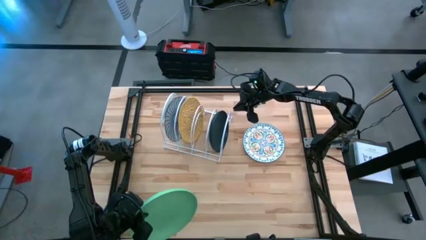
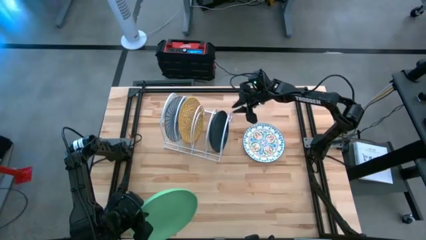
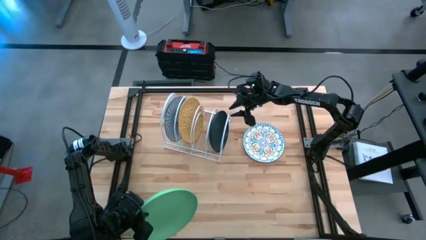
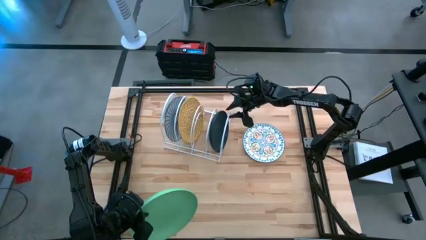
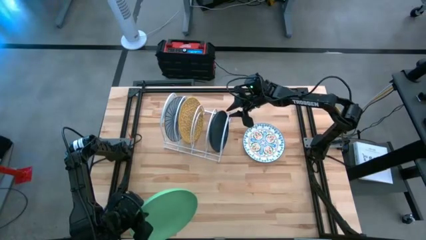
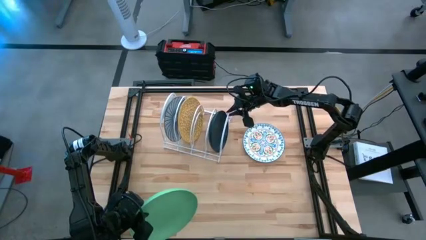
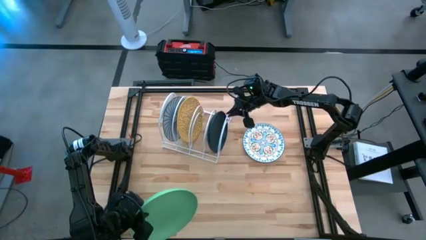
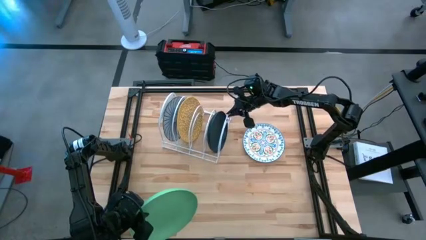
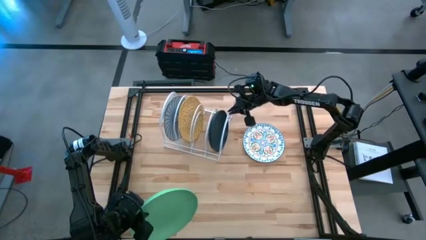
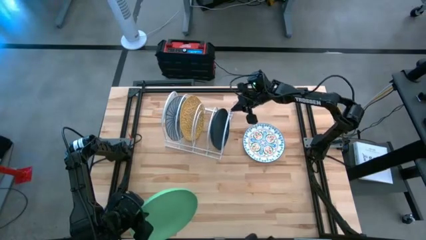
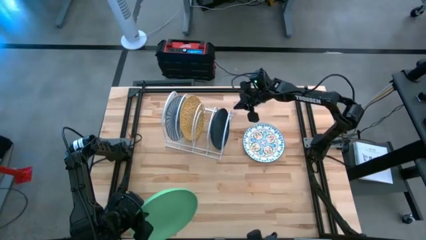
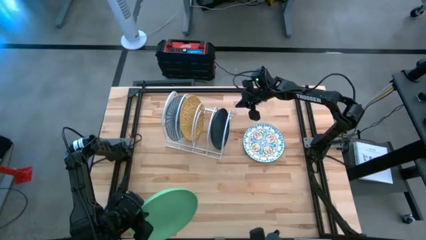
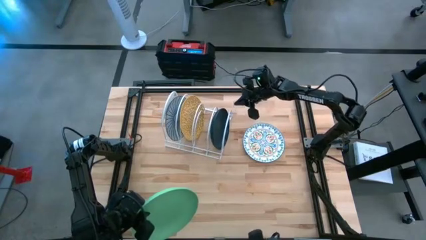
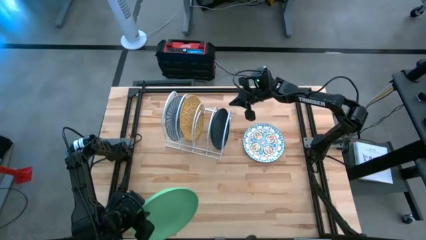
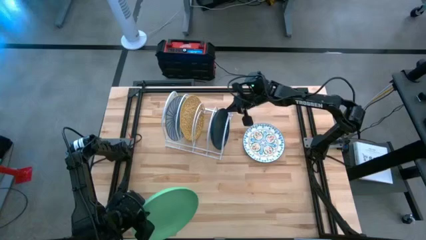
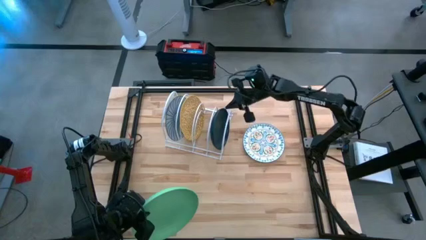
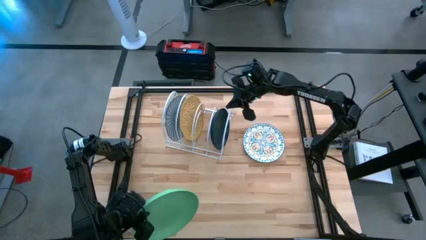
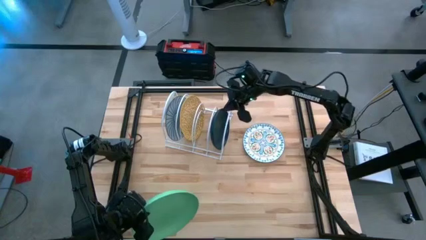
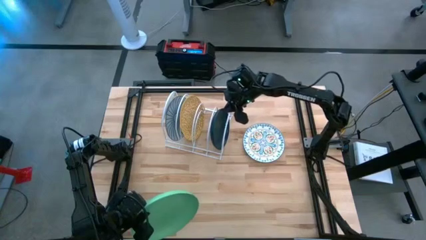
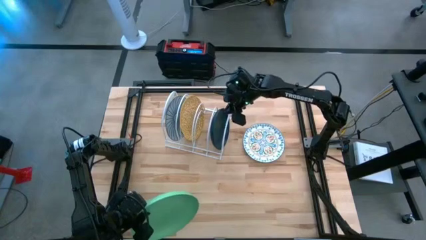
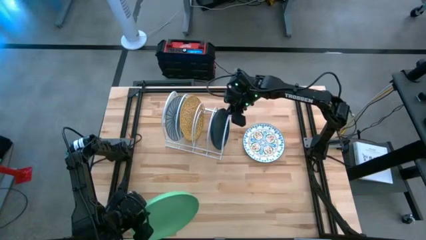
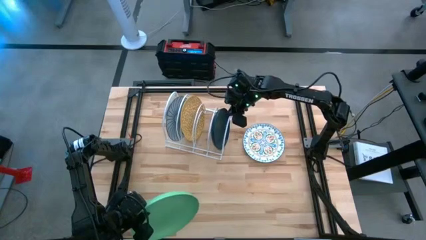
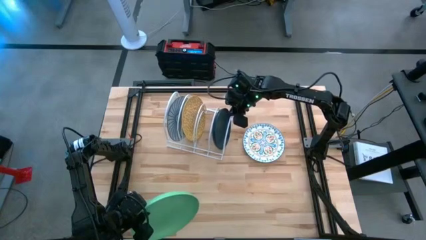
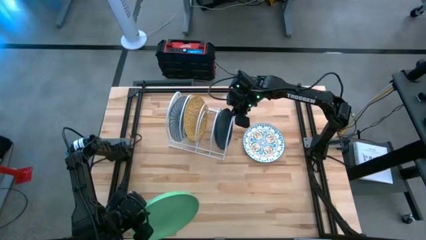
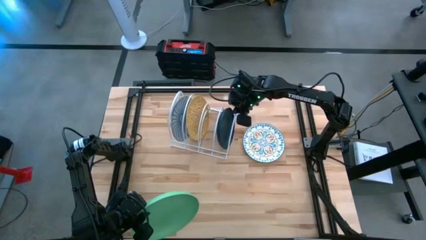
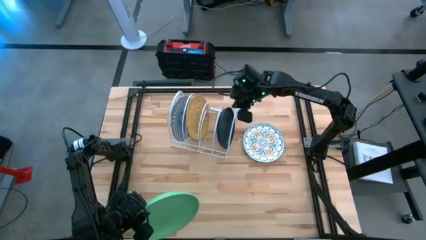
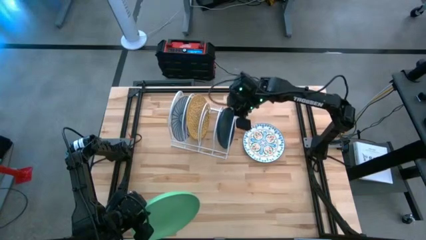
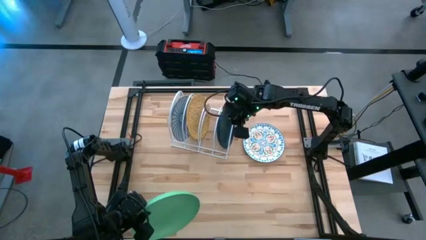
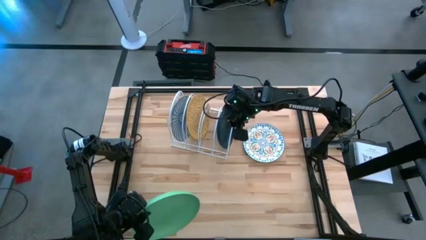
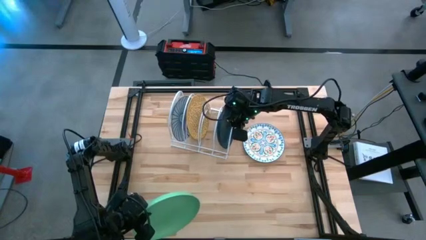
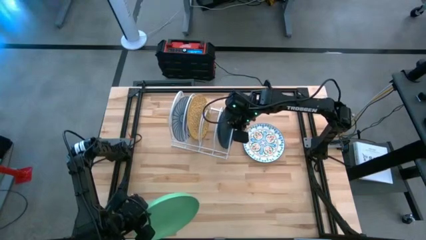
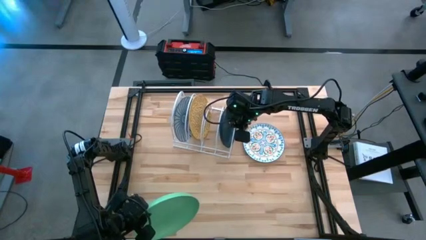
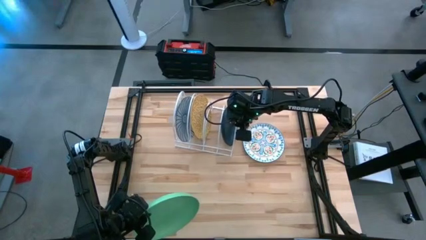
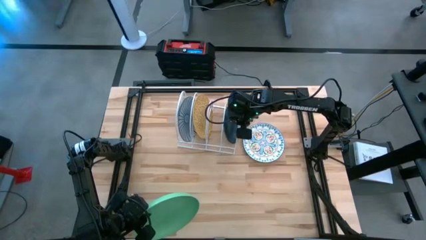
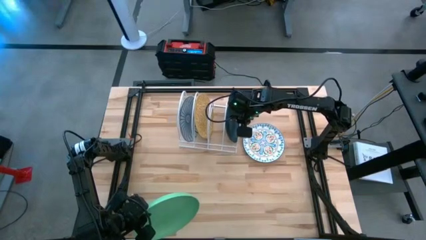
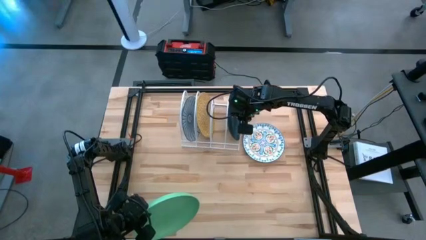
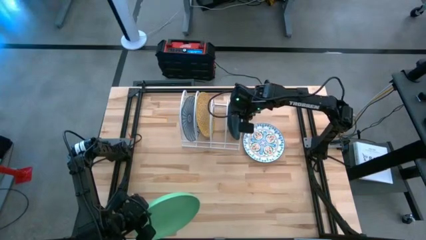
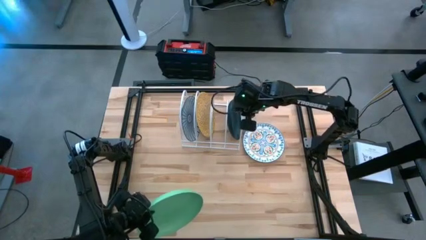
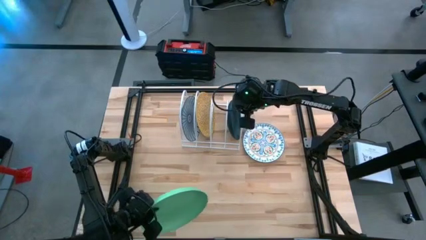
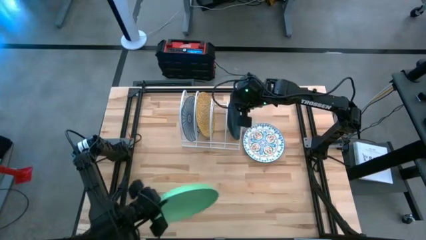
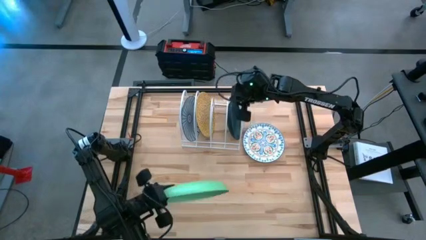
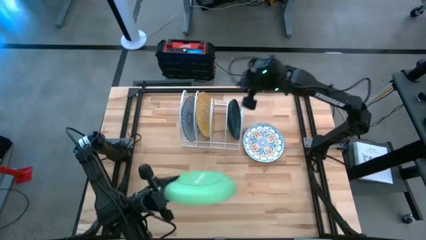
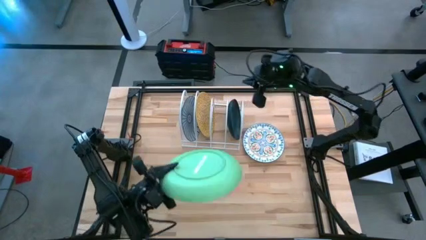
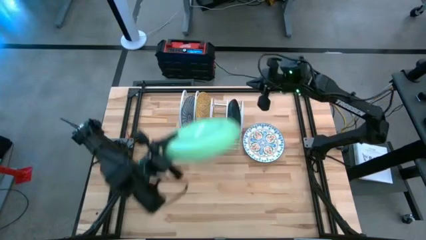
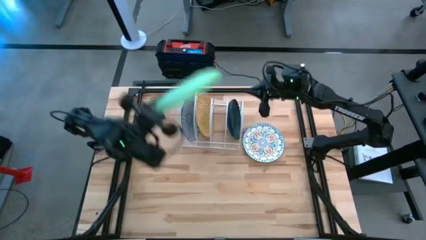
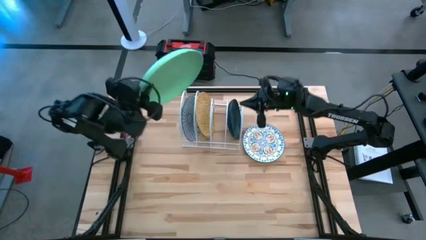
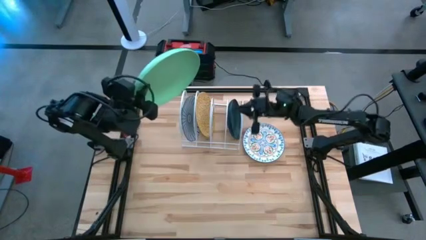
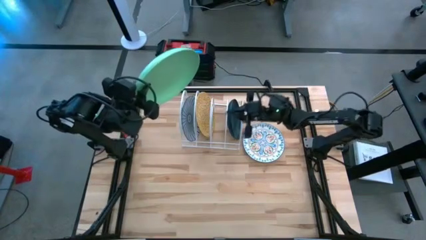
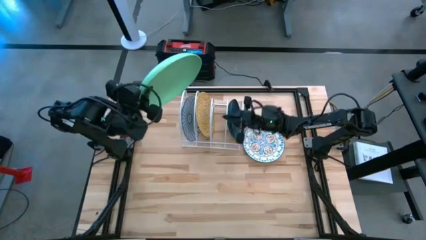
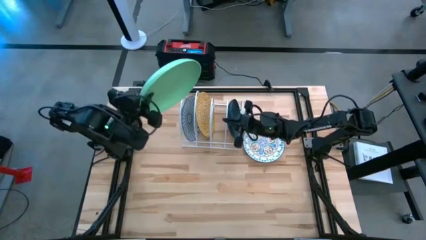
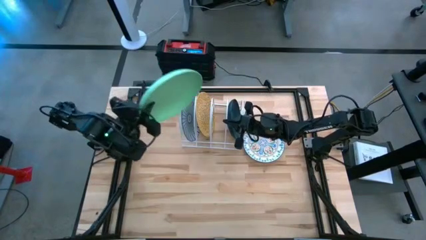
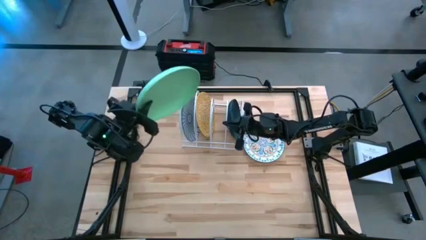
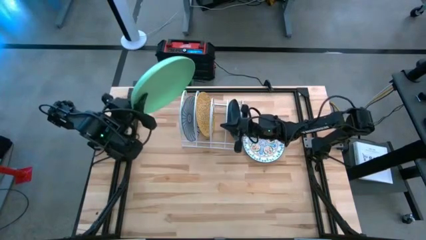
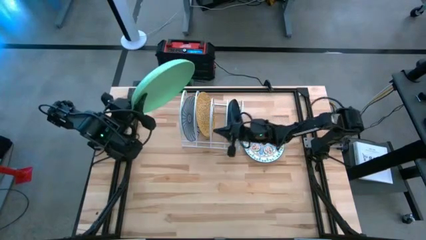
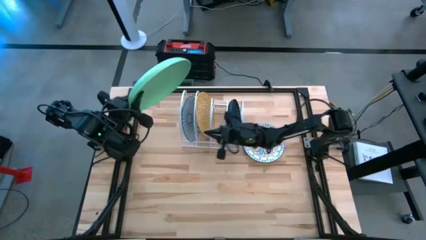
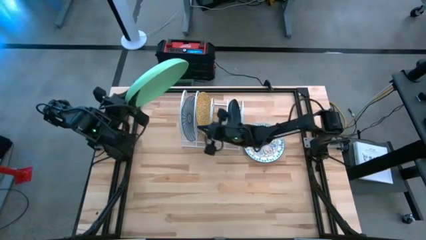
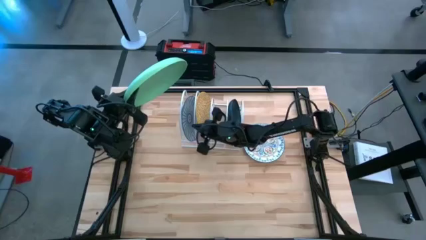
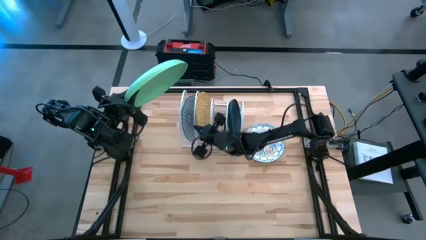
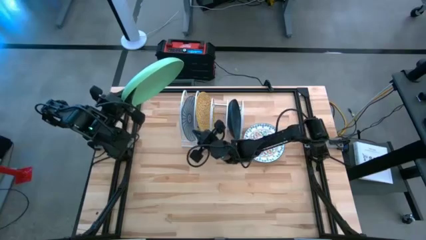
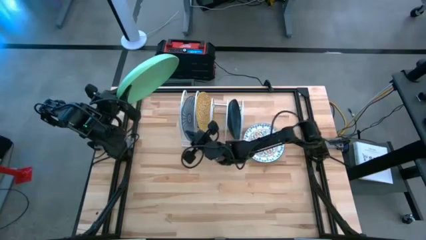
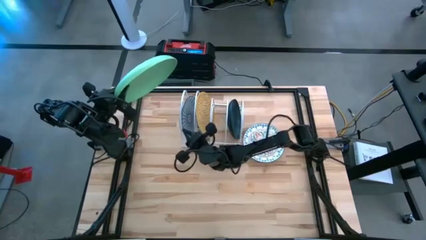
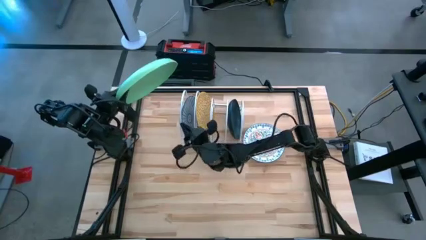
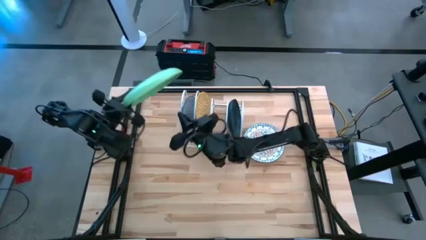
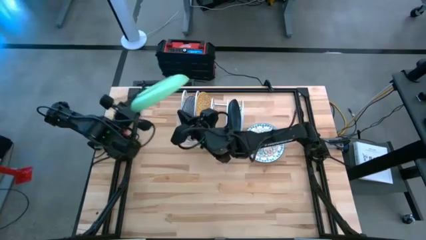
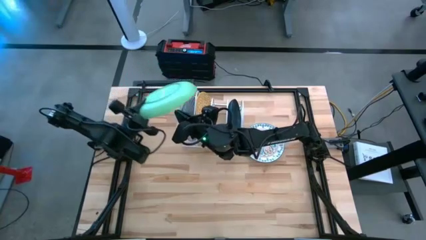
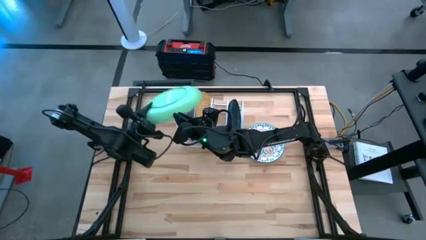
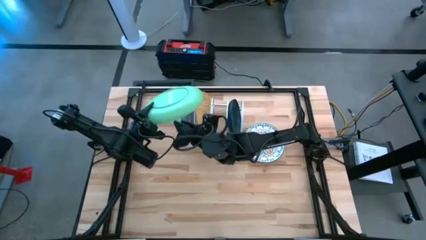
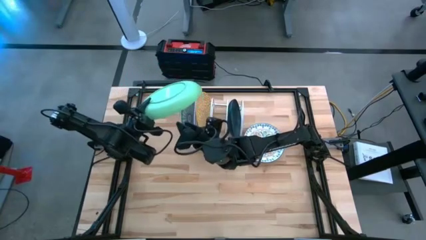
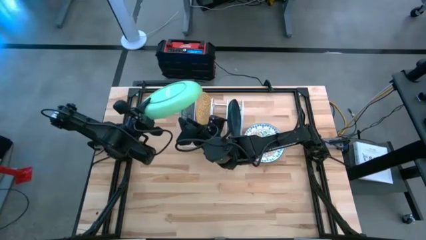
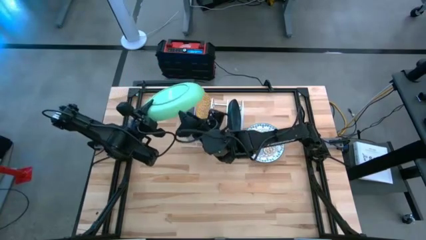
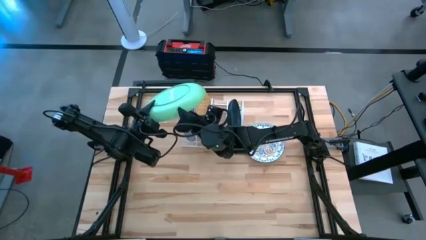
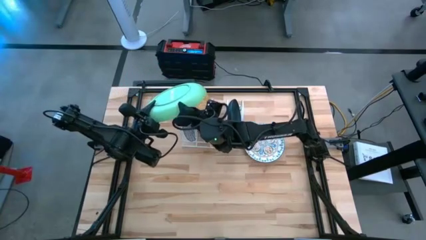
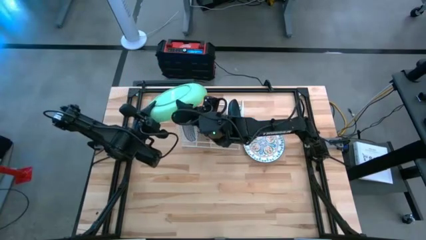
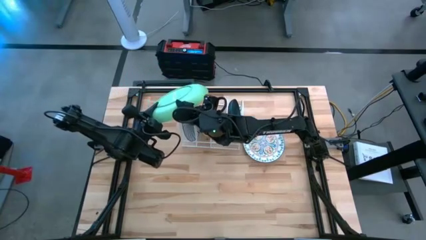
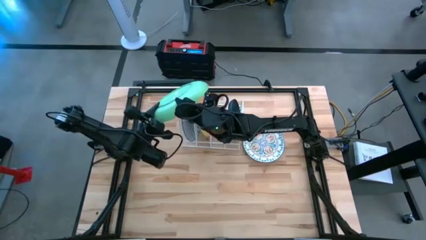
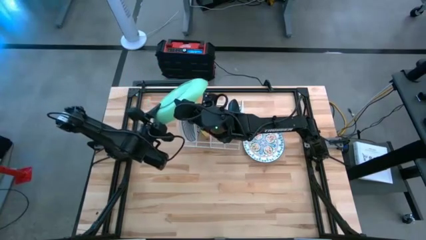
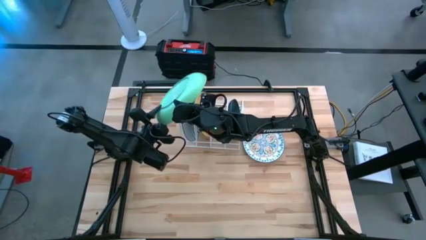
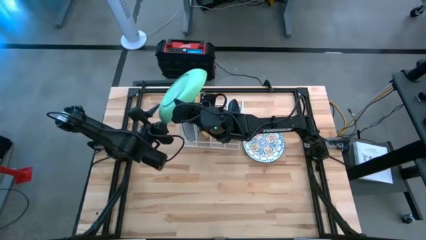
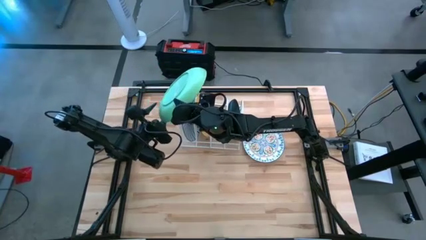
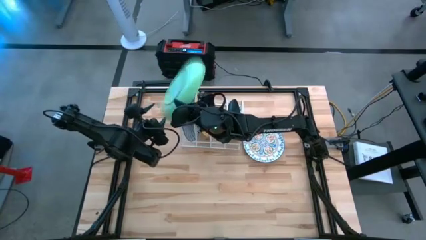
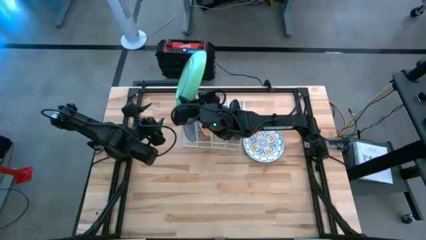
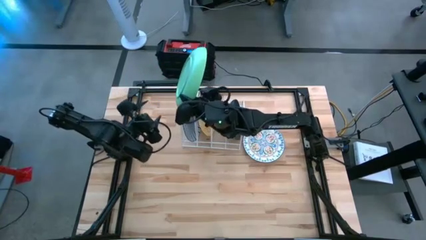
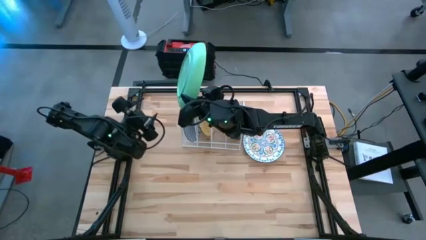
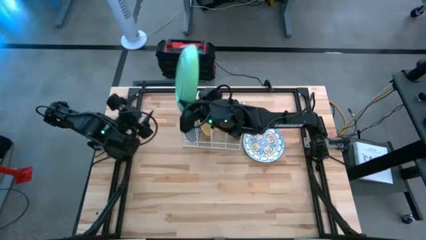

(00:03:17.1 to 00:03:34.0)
Task: Sort dishes
Put the green plate in the dish rack
